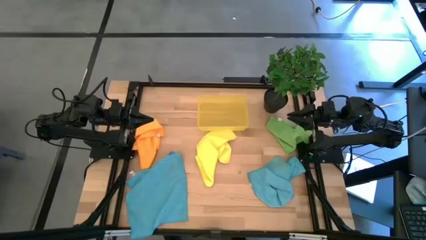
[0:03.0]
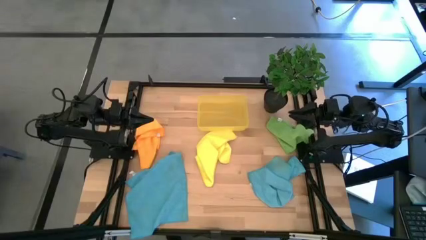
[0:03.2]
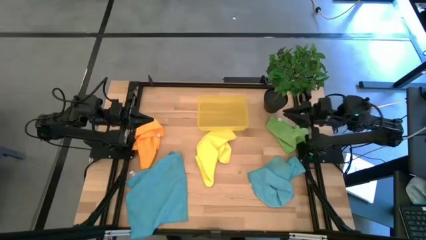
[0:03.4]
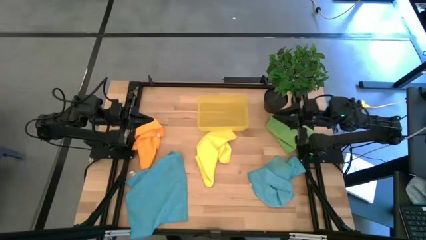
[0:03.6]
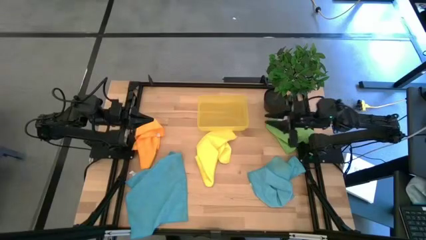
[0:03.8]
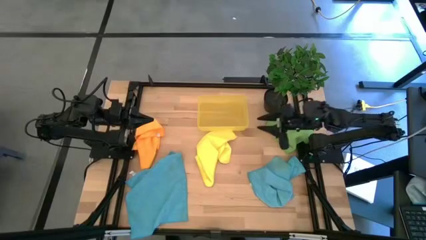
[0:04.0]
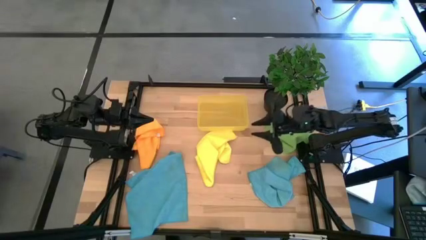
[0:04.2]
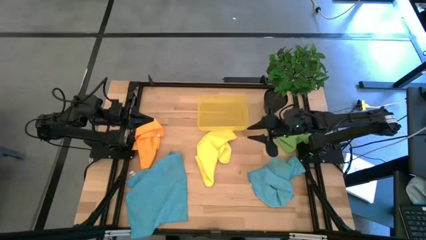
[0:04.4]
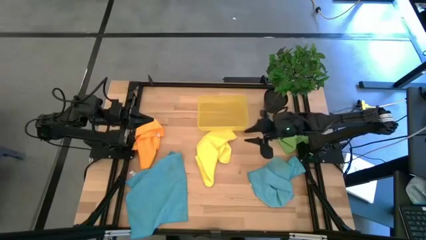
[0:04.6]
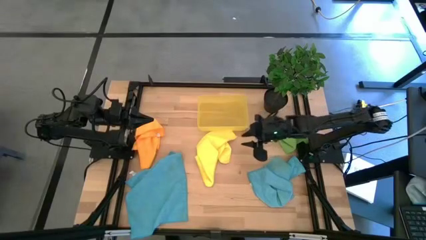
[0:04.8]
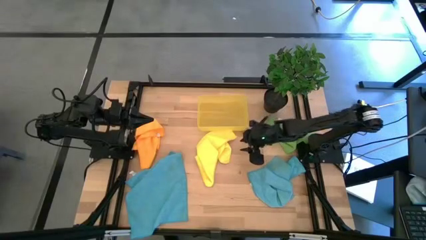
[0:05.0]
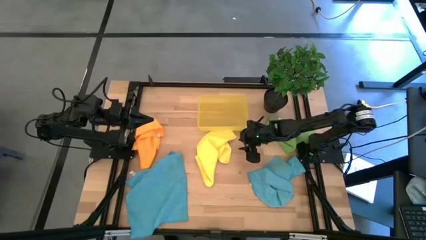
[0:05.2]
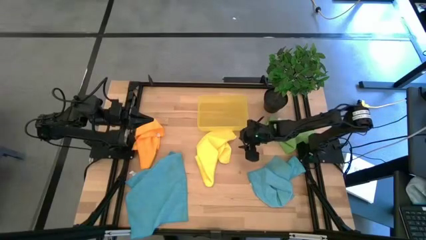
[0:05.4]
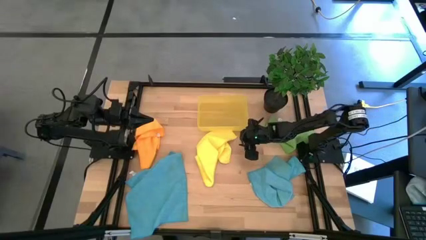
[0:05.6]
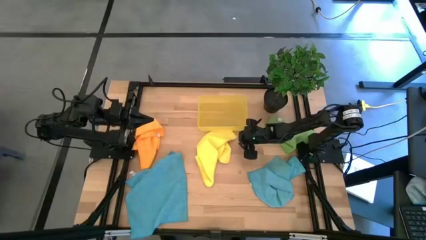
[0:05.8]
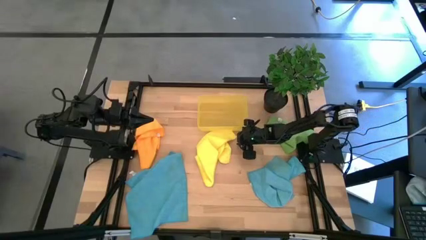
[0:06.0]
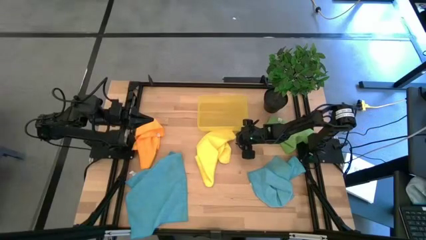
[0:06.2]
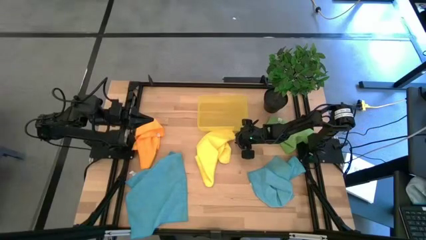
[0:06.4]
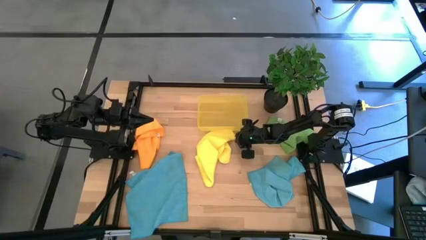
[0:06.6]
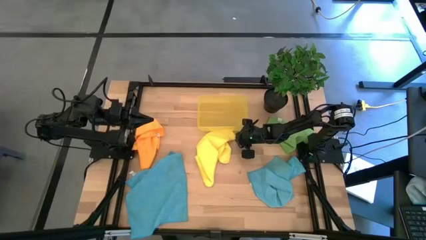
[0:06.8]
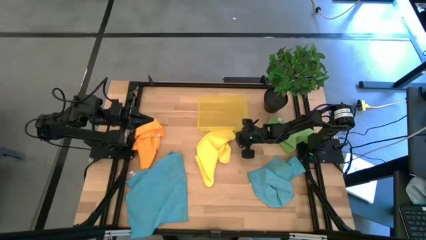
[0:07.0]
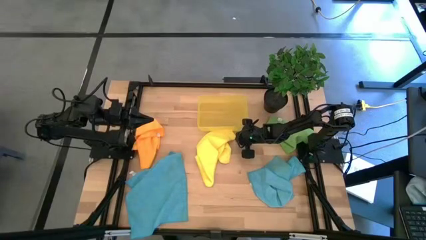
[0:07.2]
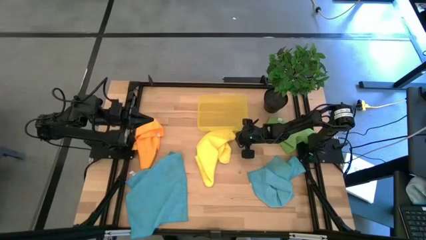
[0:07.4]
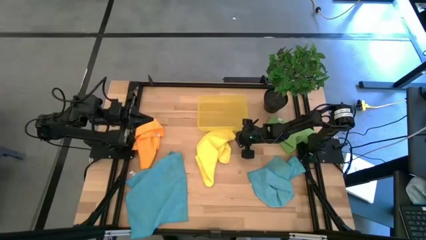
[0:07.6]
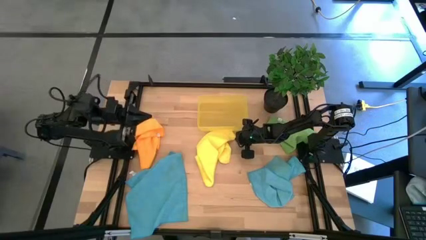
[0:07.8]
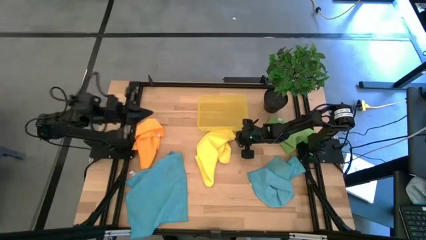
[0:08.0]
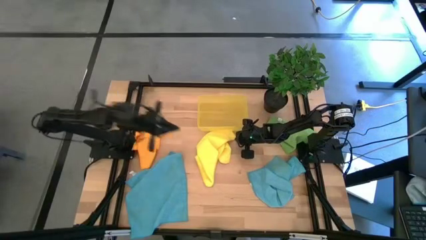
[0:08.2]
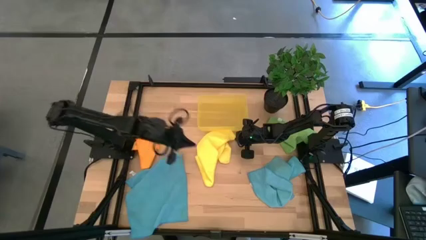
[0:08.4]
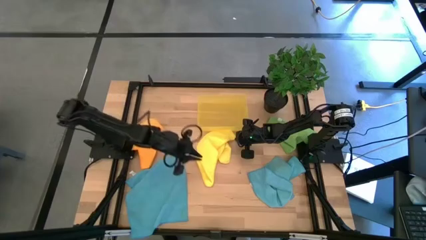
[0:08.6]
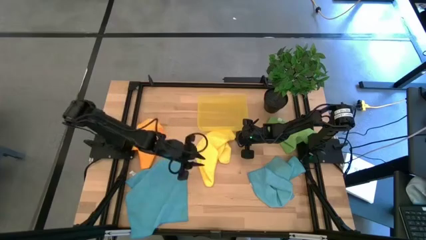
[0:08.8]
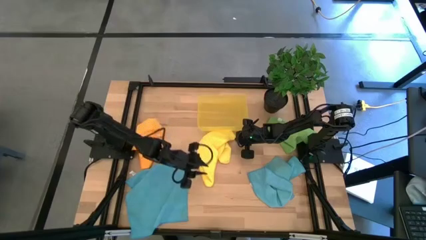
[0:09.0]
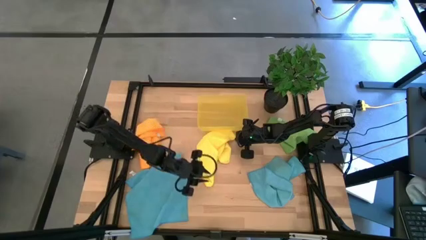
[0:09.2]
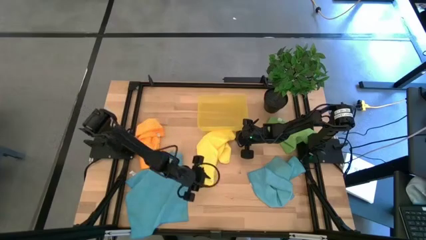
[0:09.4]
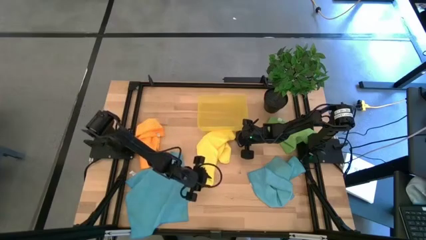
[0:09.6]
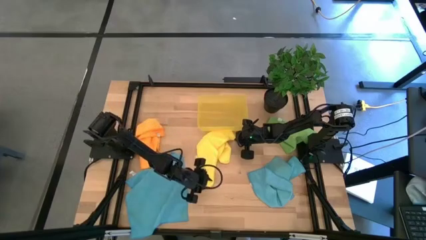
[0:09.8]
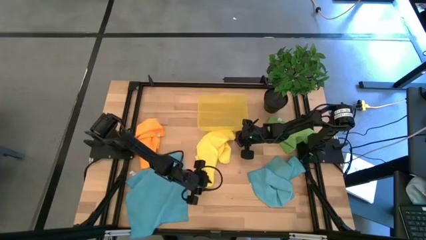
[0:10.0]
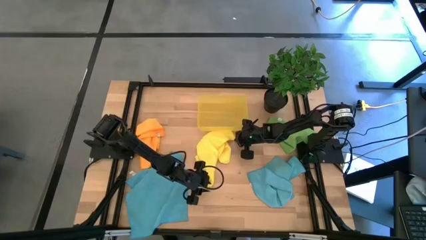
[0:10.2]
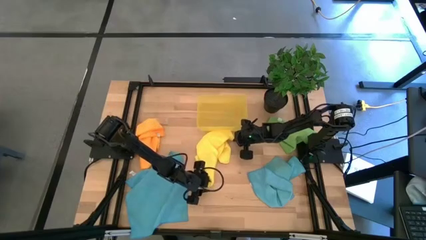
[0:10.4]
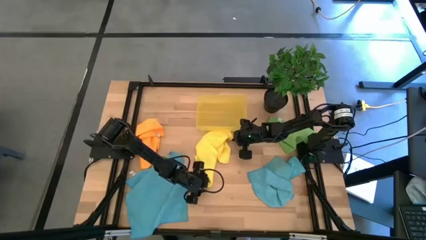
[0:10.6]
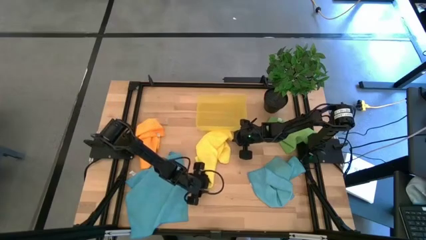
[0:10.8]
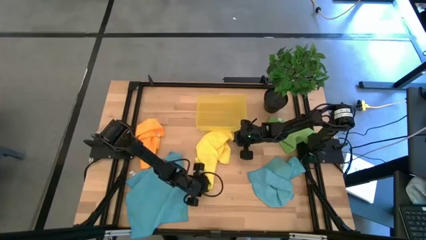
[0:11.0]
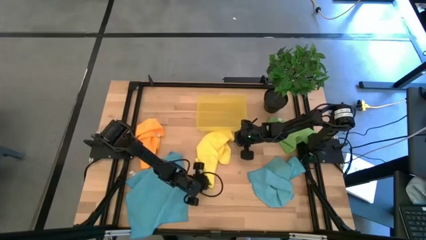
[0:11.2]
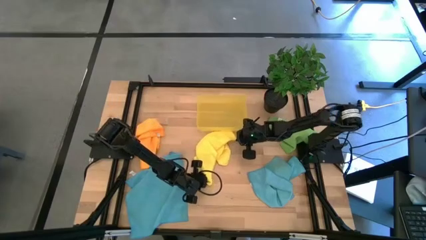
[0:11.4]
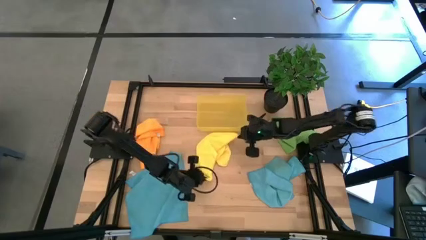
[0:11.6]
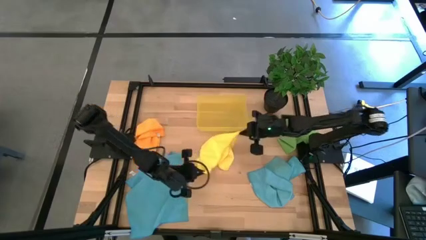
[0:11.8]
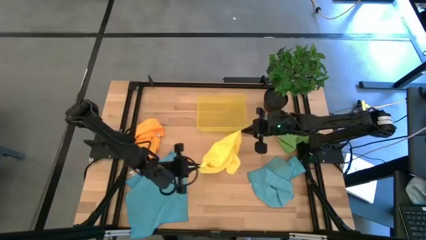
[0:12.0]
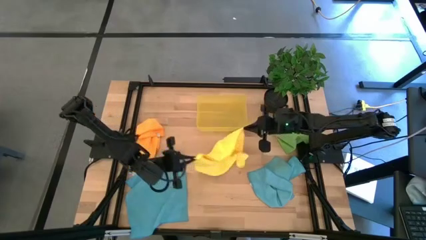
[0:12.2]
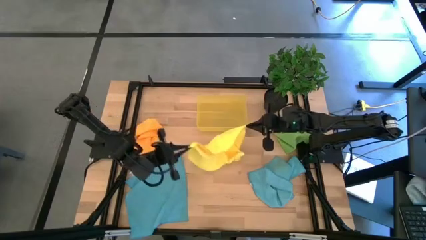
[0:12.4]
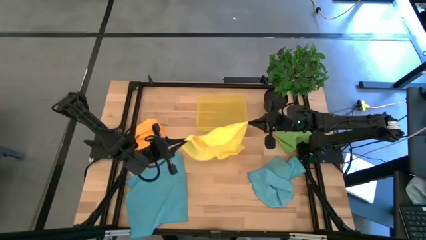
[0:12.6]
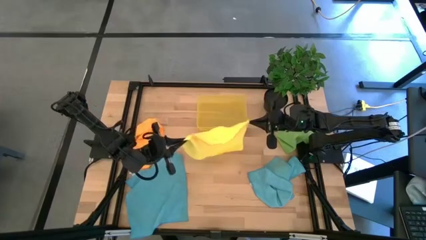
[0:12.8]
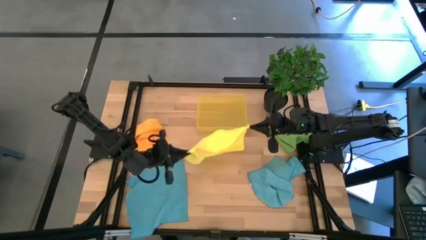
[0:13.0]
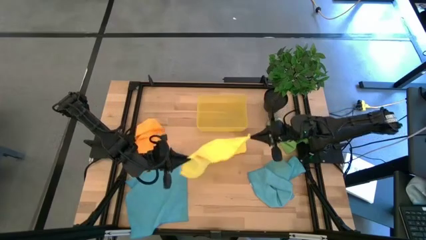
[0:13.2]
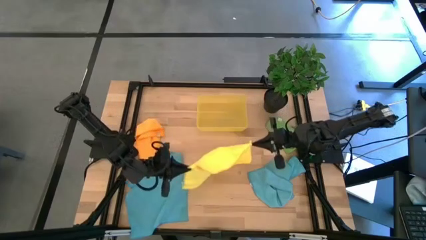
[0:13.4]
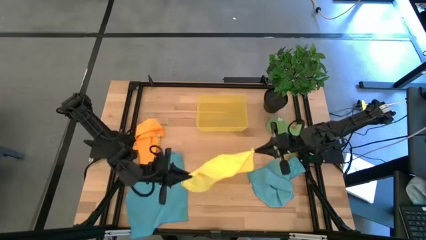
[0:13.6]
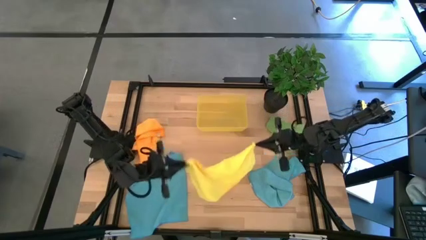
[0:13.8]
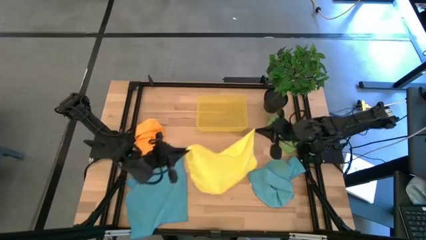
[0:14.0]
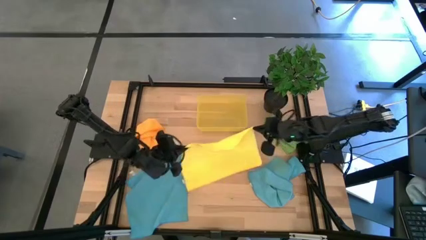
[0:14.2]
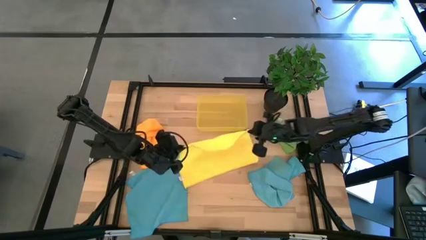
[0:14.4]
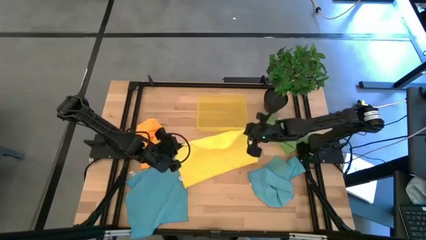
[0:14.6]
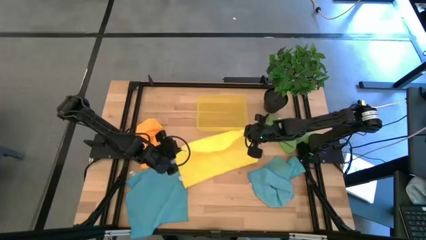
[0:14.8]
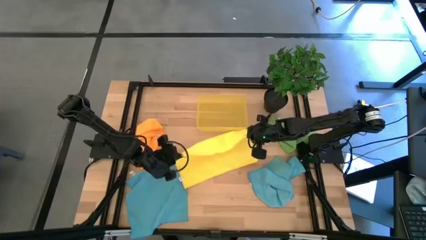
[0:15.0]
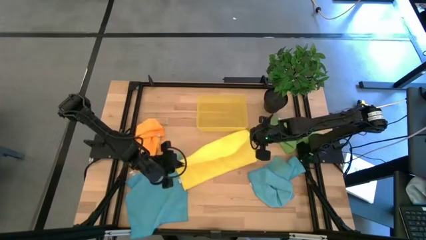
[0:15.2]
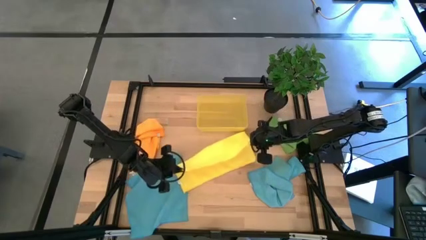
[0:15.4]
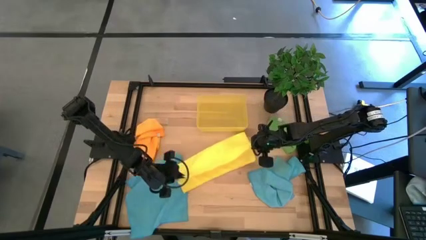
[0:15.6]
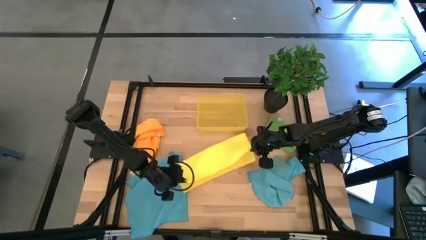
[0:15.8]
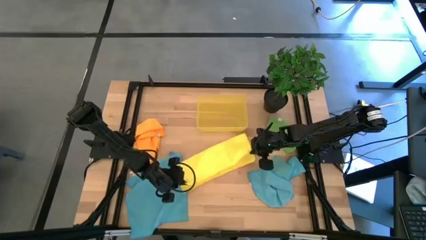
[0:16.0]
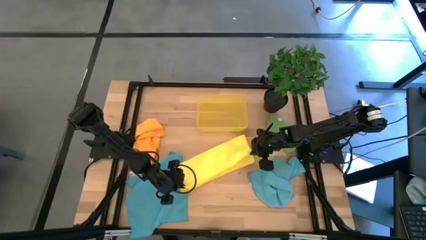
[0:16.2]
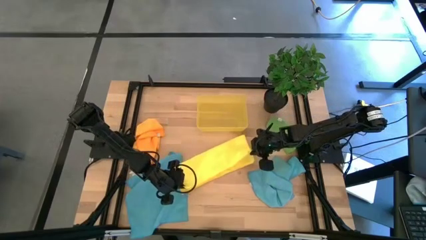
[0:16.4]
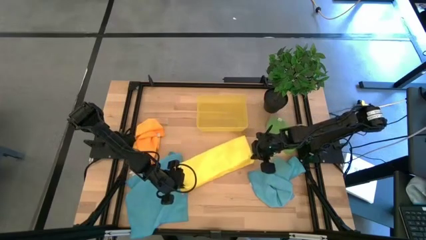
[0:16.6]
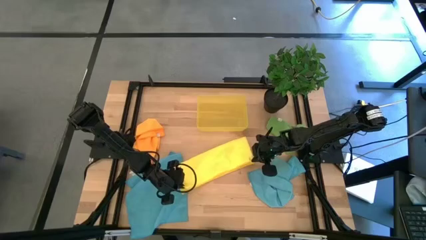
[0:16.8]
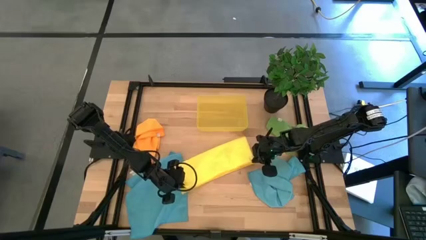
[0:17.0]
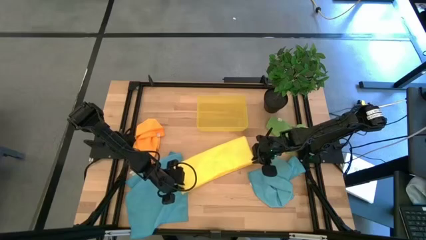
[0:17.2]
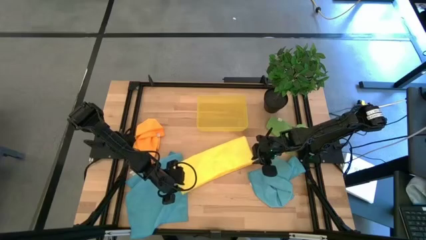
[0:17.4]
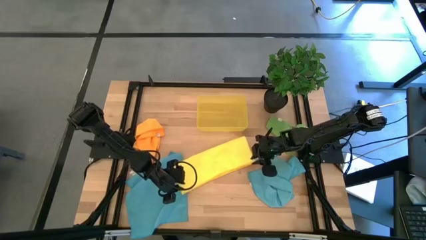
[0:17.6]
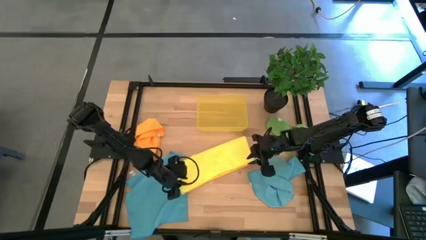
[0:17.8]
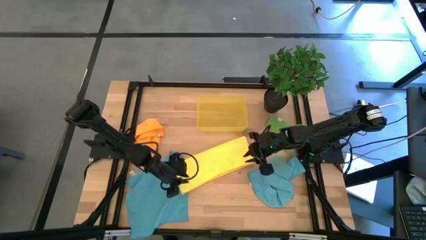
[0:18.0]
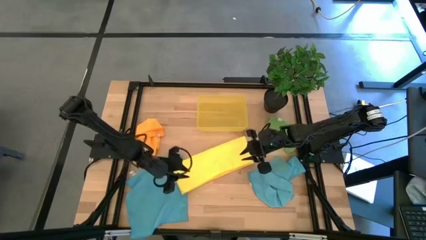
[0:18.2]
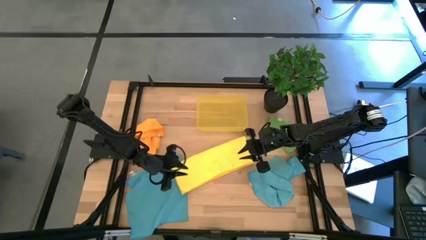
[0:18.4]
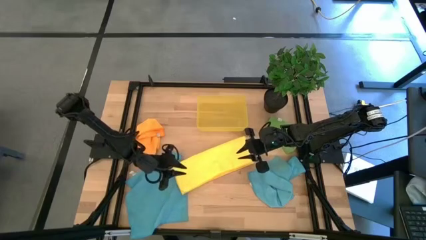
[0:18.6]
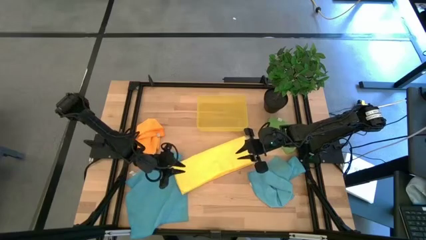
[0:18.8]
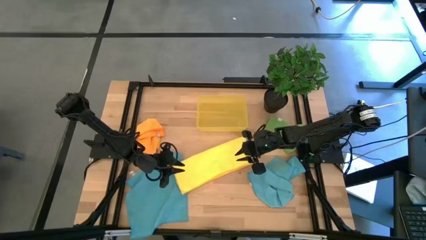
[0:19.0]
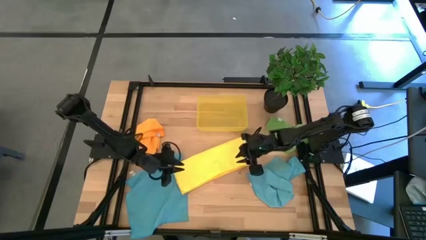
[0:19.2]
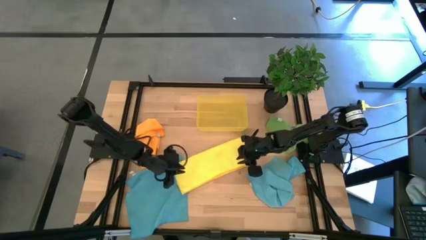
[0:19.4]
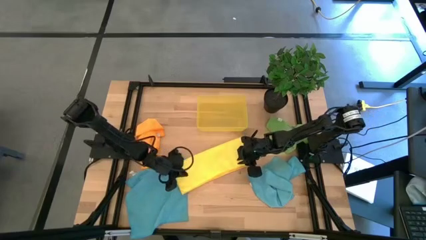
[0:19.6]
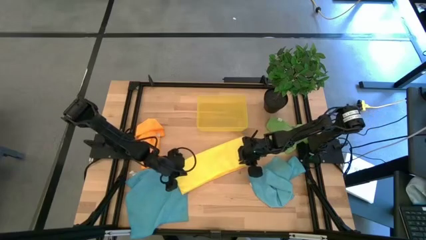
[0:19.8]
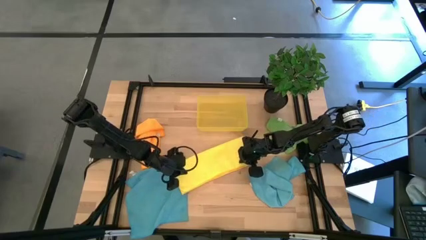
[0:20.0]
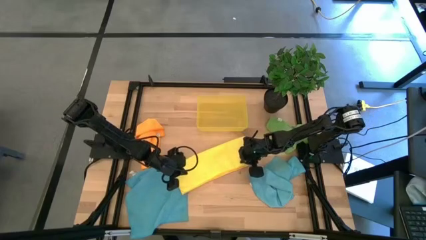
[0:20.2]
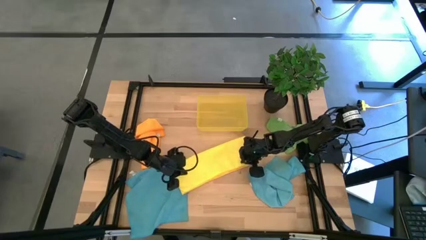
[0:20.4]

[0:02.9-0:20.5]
Task: Fold microfiber towels
Fold the yellow microfiber towel
